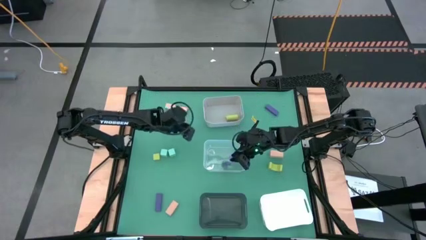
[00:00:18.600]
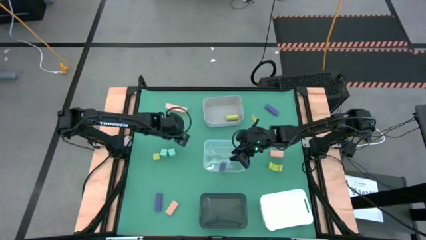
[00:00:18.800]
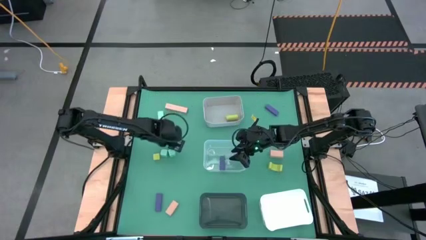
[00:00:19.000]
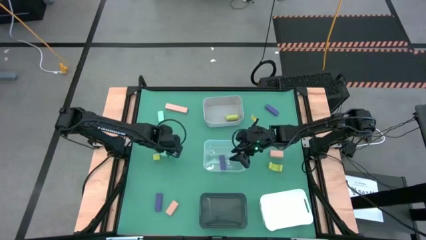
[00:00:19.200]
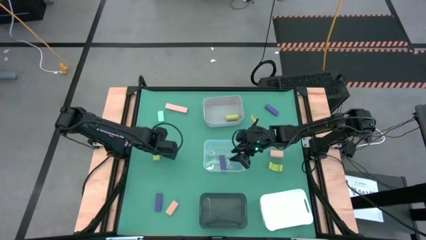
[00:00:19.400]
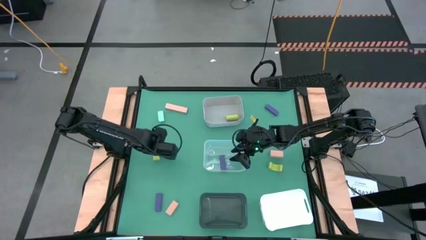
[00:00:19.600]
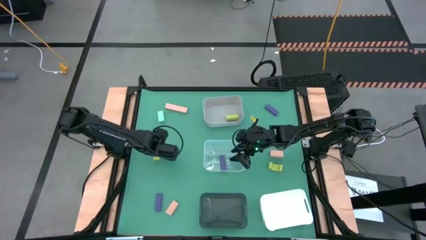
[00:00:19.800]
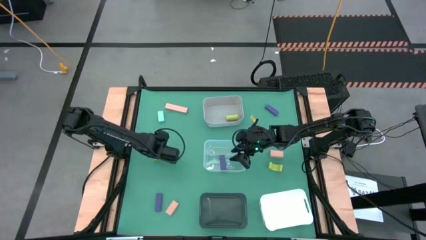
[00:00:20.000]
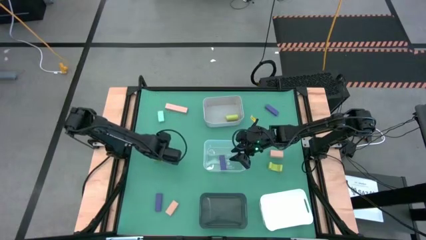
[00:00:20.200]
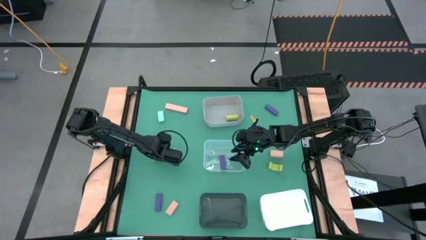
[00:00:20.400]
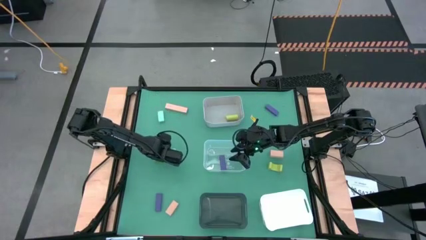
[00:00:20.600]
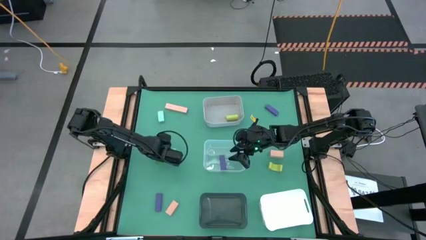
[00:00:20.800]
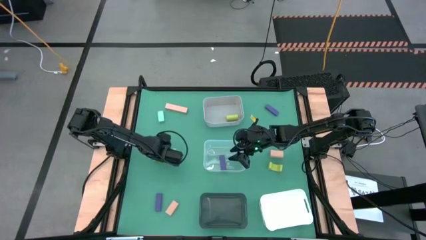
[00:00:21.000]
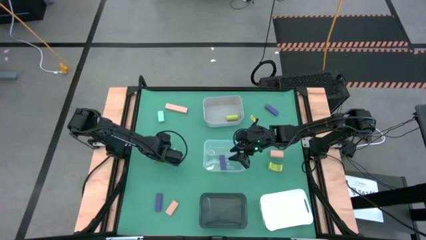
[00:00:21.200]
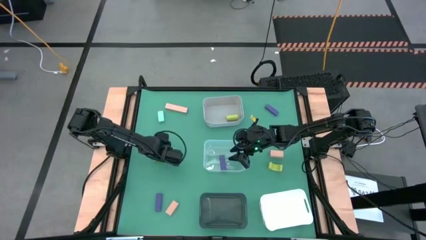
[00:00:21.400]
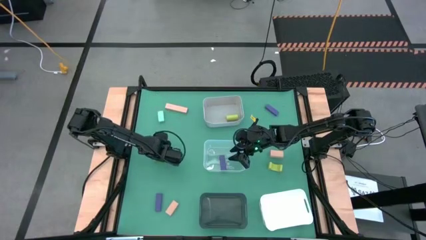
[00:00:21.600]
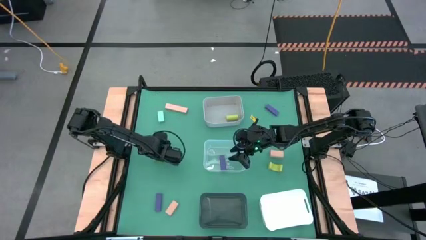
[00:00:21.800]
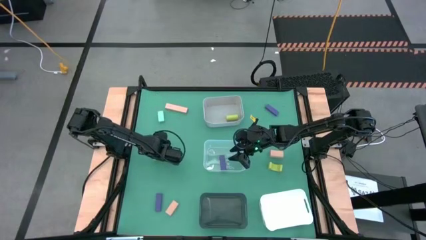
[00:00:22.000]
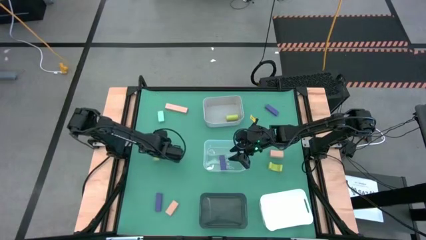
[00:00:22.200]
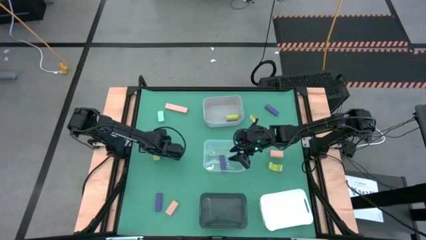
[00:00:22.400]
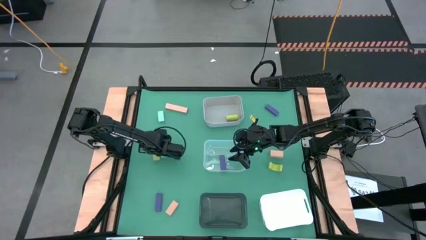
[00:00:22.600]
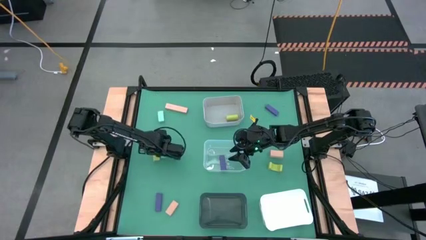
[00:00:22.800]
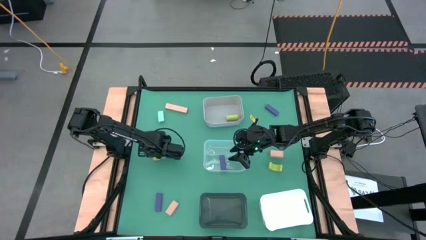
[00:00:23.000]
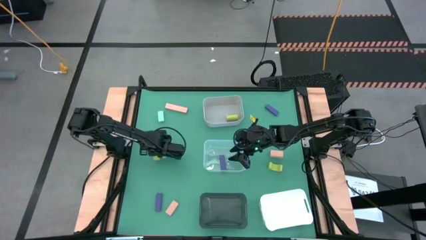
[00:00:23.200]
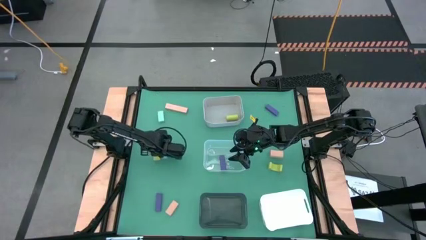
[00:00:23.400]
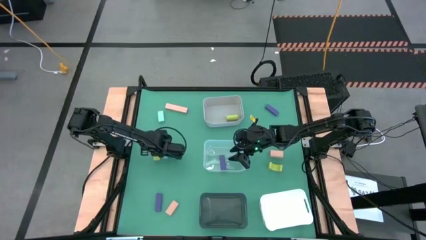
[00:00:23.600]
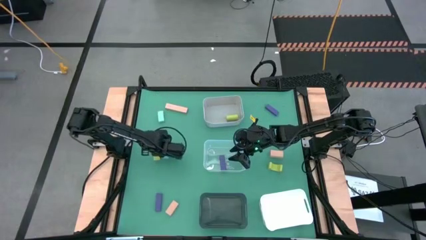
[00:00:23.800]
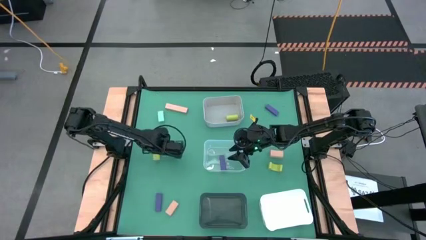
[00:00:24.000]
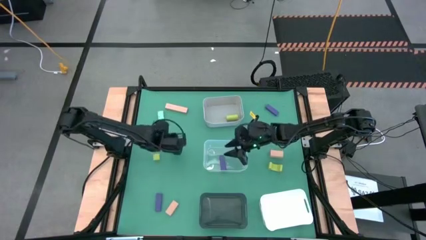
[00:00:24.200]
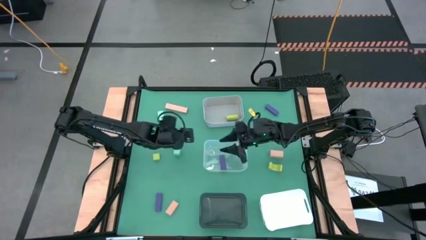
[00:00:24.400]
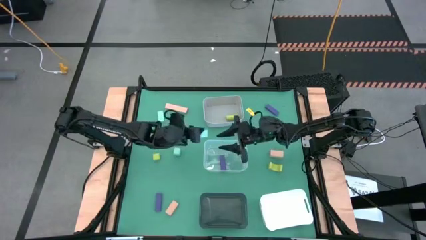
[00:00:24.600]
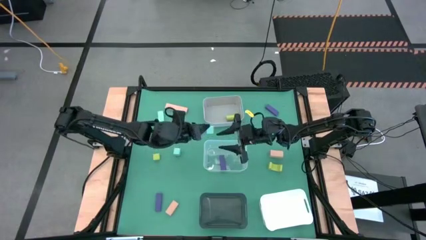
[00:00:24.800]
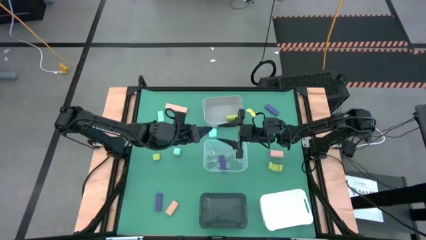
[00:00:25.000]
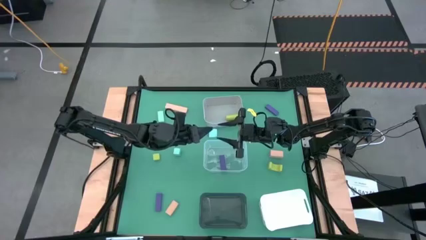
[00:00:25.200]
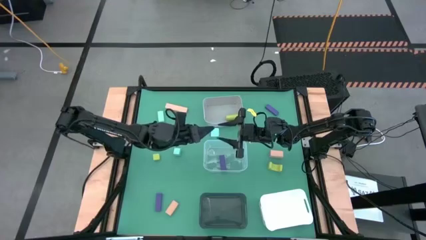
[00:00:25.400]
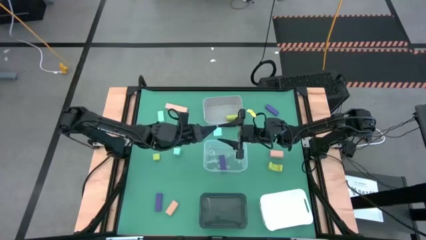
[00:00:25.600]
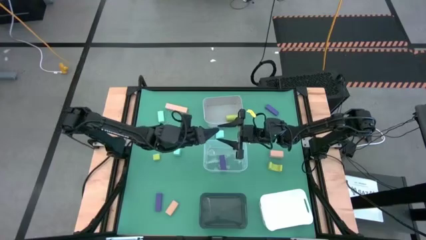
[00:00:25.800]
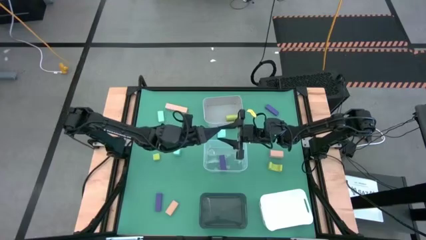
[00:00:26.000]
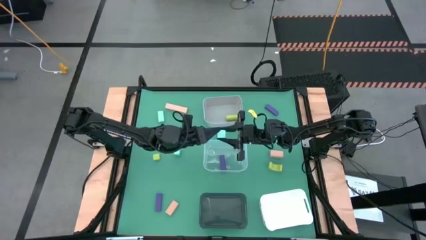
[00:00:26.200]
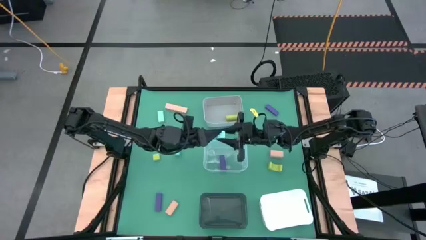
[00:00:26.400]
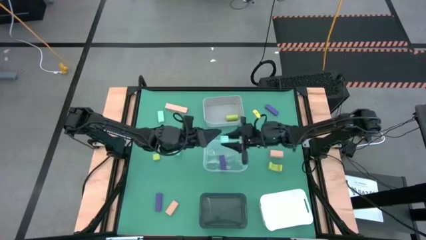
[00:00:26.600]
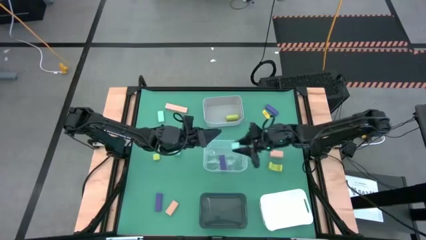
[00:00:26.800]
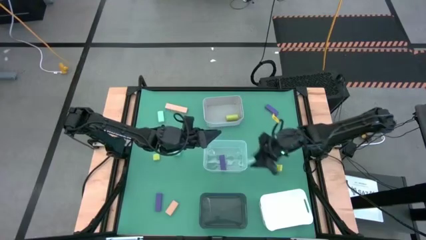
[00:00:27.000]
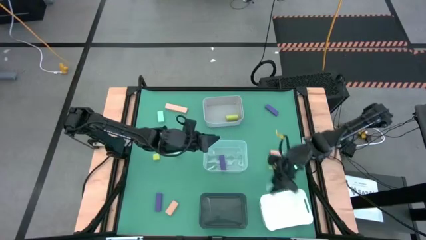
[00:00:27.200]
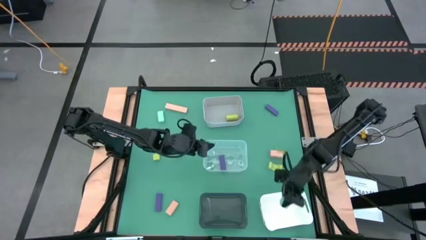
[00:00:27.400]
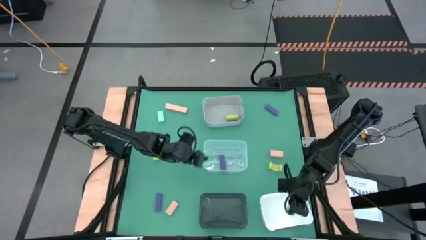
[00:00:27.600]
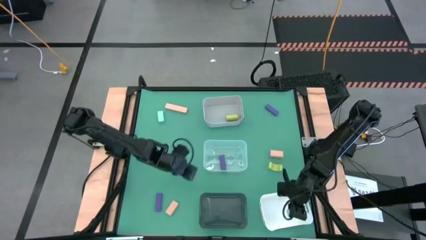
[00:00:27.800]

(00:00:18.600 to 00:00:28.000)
Task: Sort & place blocks by color
Put the bottom left blue block into the white bin

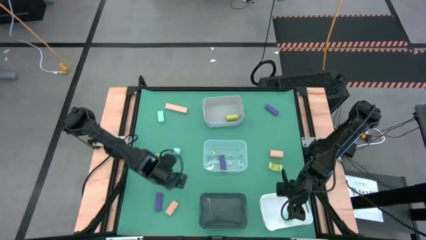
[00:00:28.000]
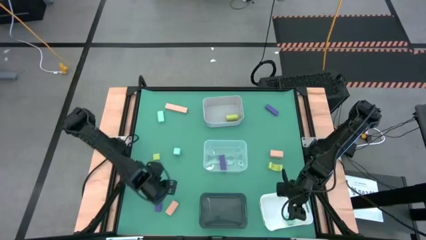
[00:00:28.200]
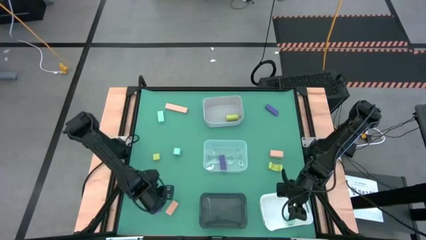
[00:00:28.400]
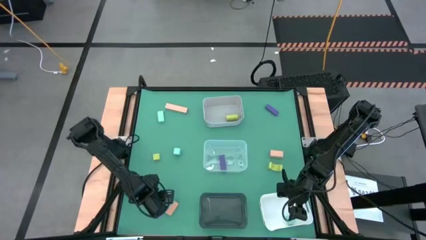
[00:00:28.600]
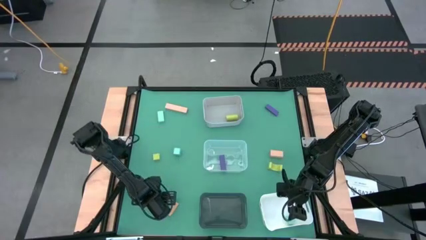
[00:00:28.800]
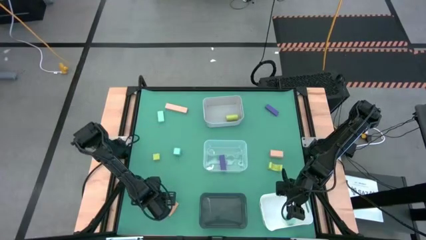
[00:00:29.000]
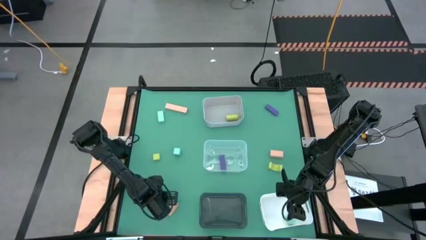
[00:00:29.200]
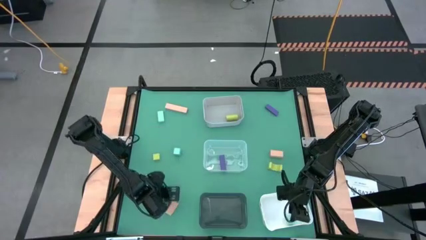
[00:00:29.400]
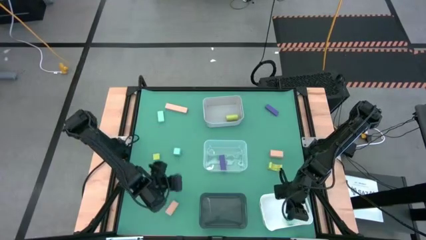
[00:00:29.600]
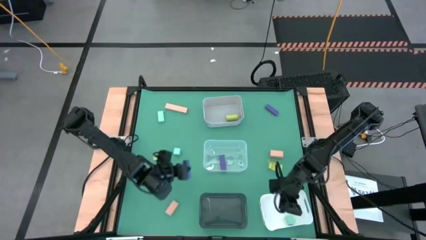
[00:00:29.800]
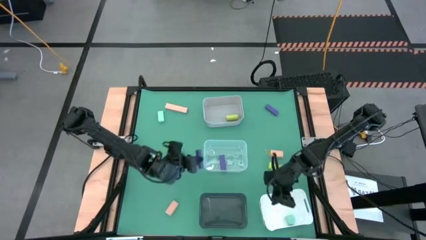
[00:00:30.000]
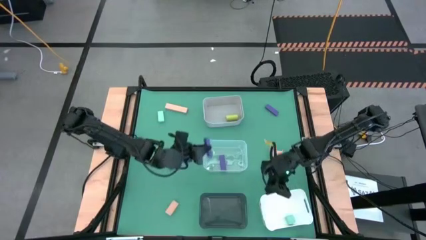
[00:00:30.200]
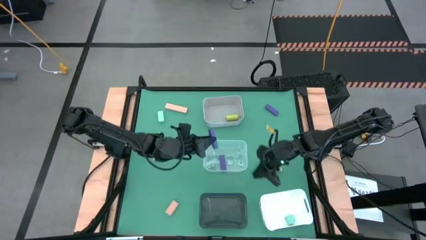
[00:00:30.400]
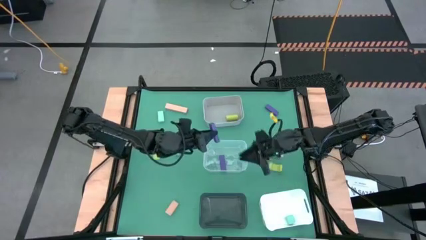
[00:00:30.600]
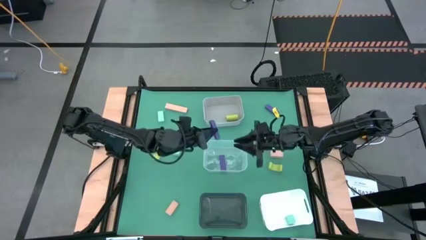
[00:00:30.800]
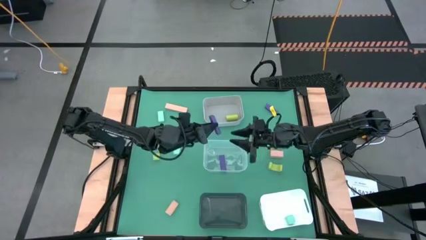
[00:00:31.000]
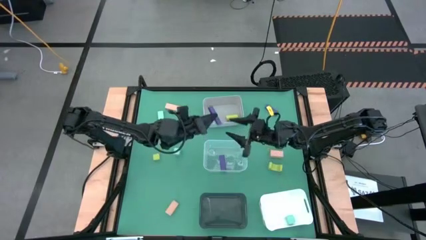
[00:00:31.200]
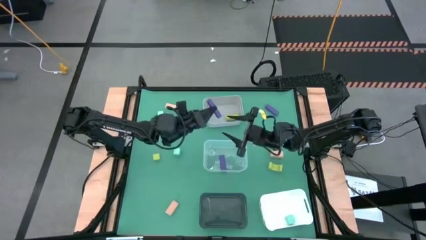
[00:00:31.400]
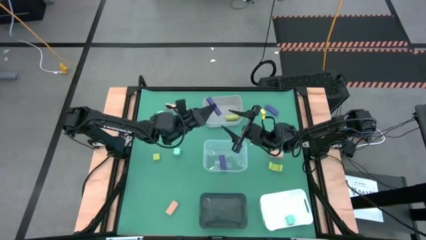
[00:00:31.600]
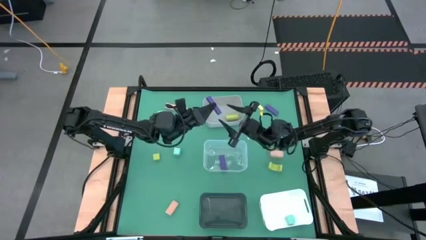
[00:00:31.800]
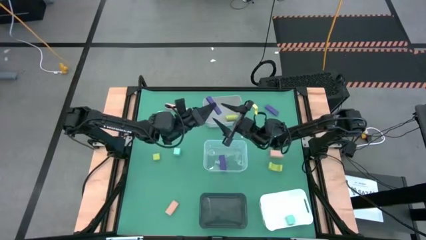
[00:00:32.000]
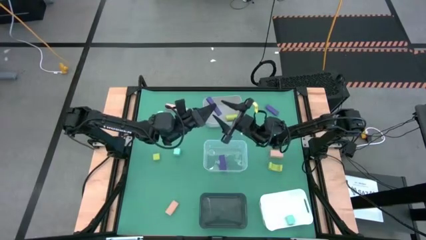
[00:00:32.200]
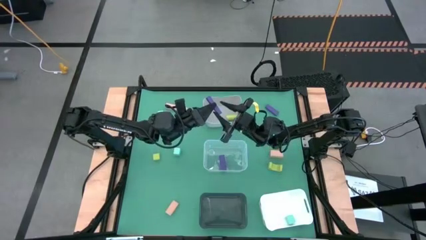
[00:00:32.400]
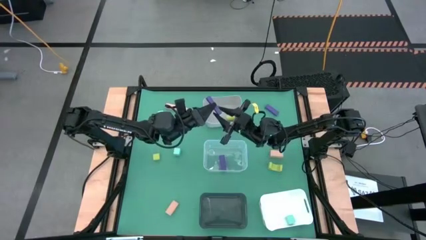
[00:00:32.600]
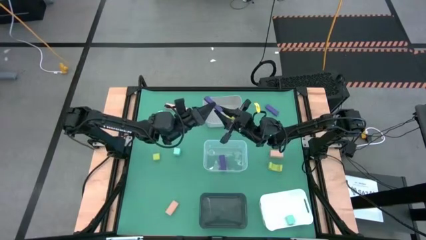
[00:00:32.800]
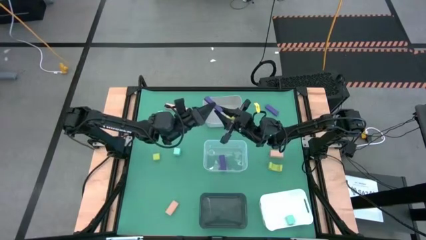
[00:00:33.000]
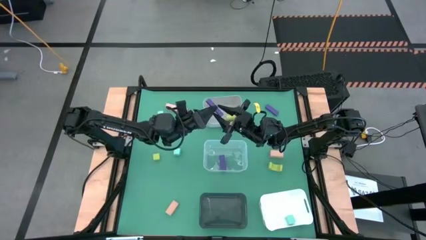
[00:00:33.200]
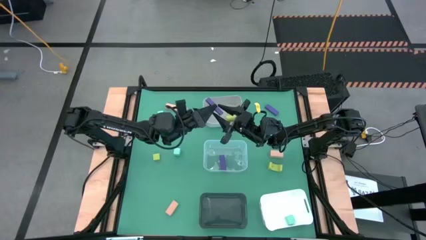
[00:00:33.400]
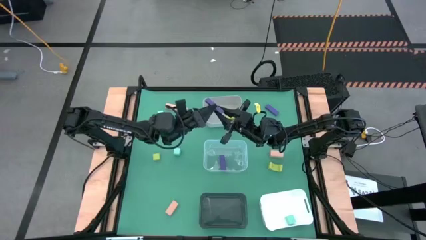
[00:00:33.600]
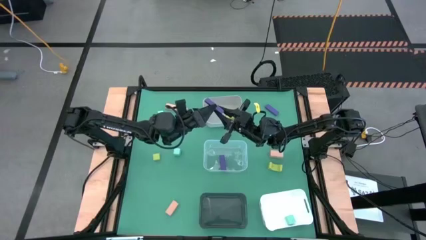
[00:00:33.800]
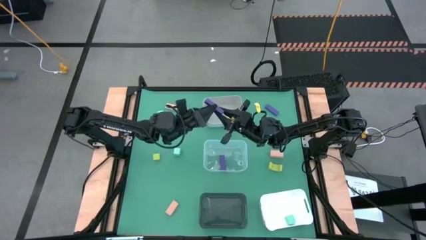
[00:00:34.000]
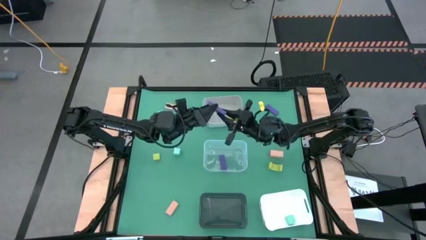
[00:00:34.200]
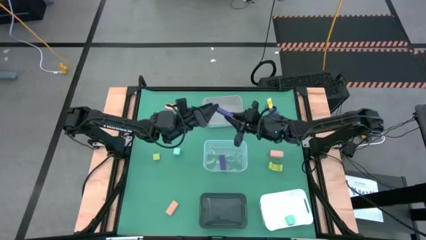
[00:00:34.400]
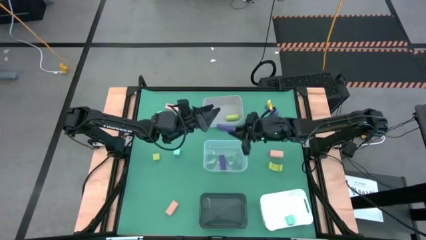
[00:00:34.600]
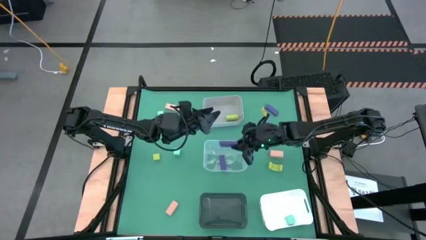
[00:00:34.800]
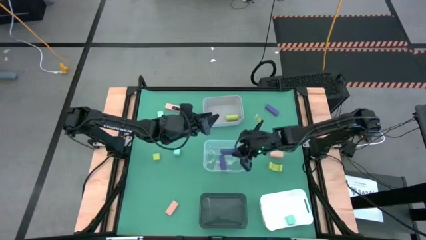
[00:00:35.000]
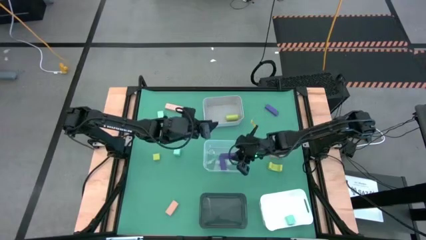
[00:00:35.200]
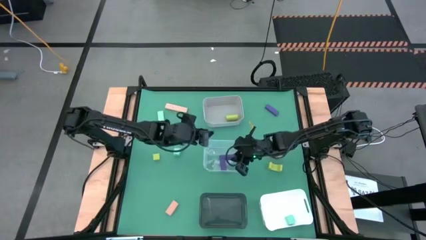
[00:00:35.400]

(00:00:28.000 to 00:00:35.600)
Put the bottom violet block into the transparent bin
